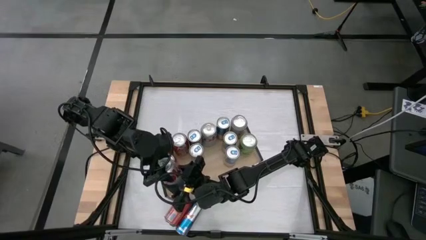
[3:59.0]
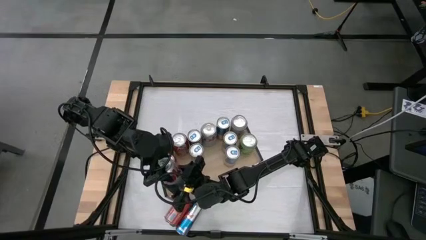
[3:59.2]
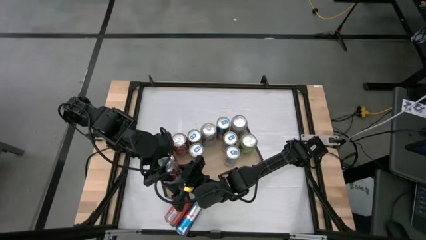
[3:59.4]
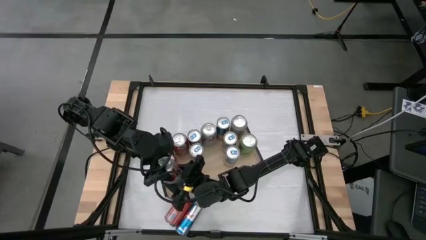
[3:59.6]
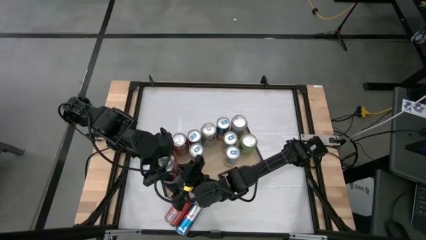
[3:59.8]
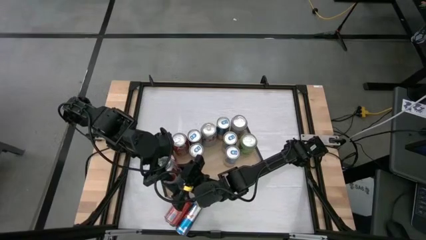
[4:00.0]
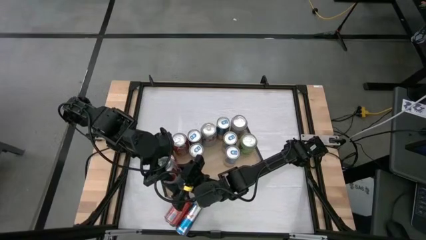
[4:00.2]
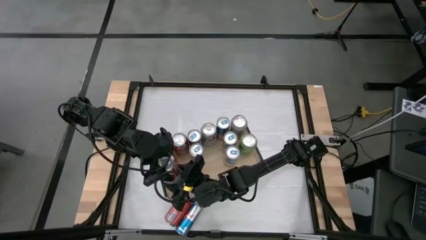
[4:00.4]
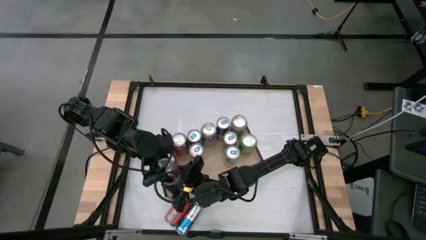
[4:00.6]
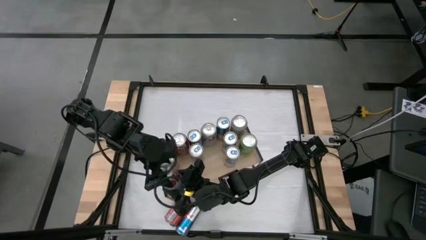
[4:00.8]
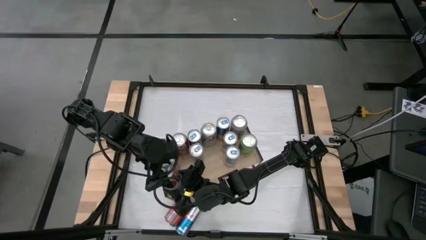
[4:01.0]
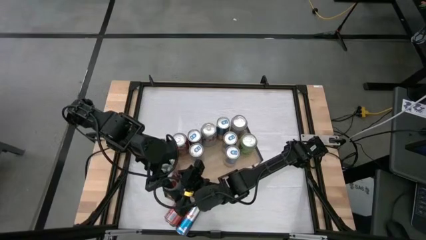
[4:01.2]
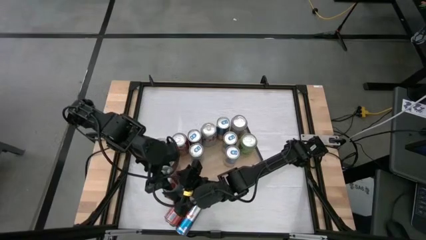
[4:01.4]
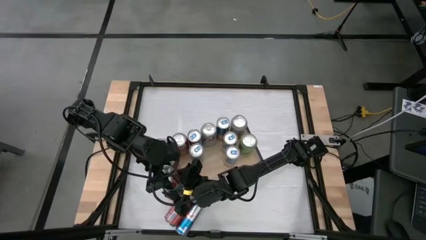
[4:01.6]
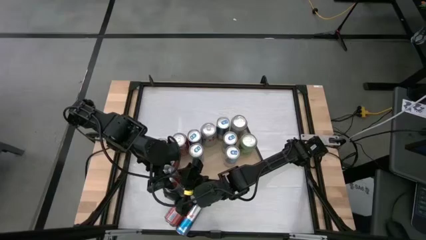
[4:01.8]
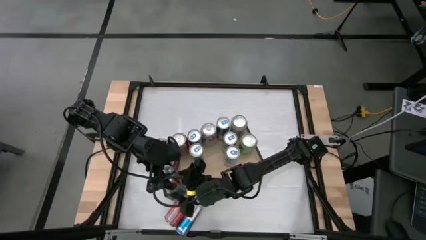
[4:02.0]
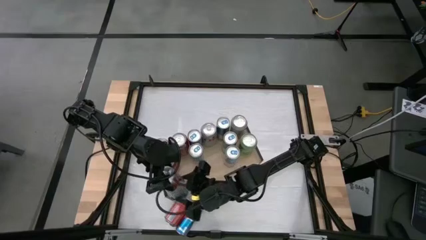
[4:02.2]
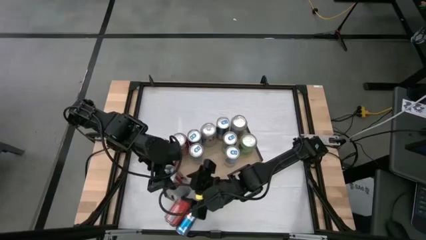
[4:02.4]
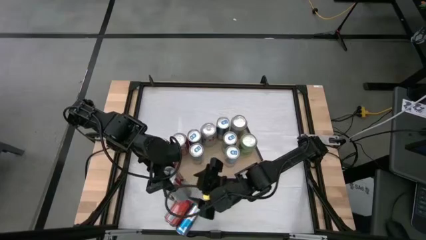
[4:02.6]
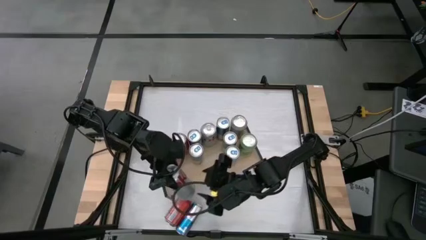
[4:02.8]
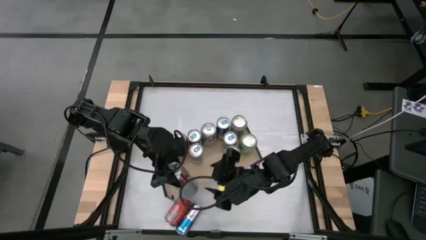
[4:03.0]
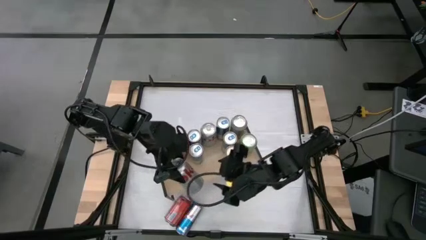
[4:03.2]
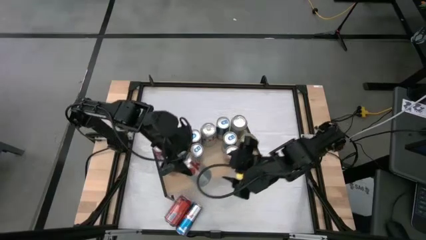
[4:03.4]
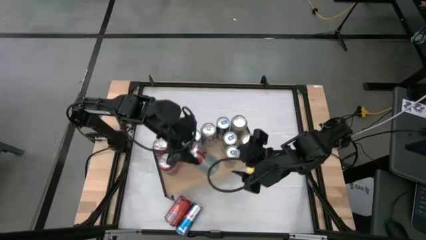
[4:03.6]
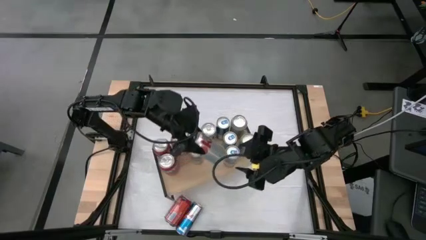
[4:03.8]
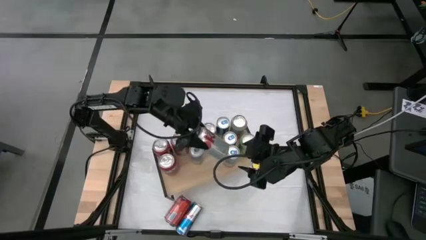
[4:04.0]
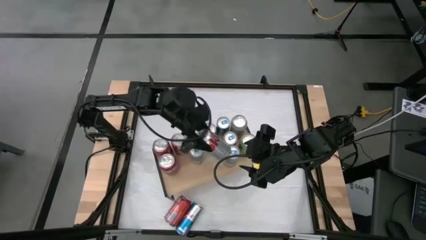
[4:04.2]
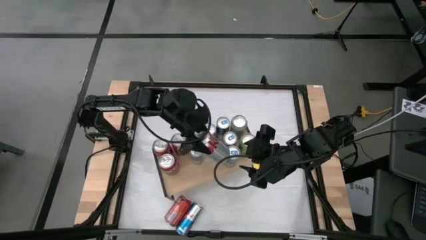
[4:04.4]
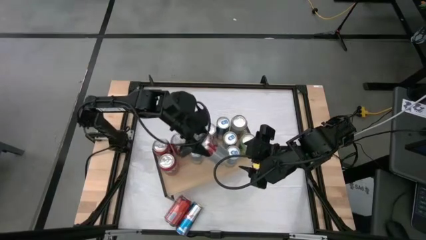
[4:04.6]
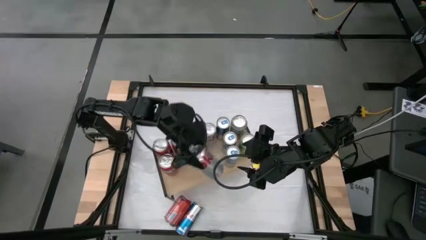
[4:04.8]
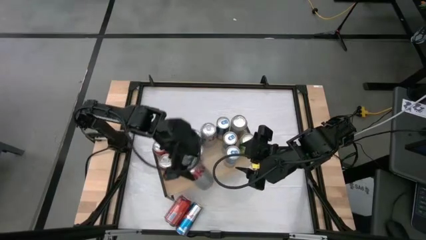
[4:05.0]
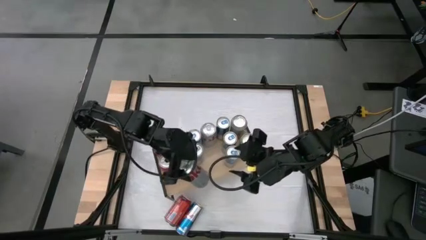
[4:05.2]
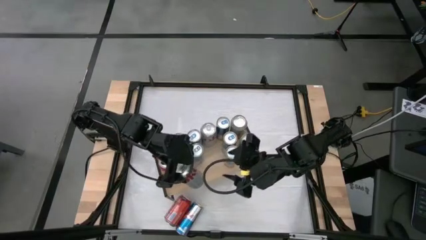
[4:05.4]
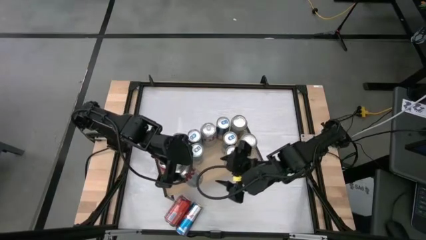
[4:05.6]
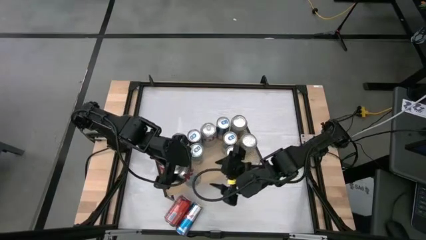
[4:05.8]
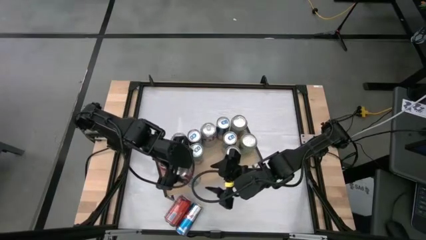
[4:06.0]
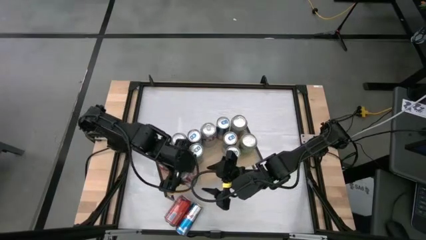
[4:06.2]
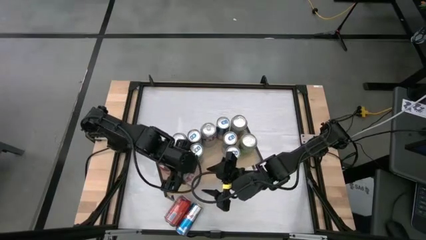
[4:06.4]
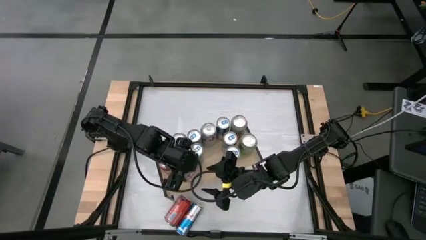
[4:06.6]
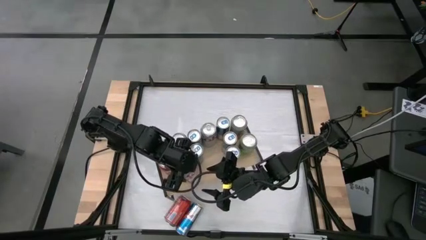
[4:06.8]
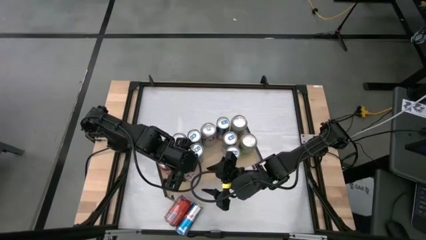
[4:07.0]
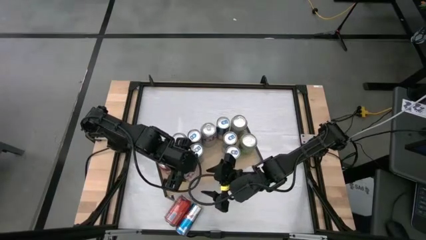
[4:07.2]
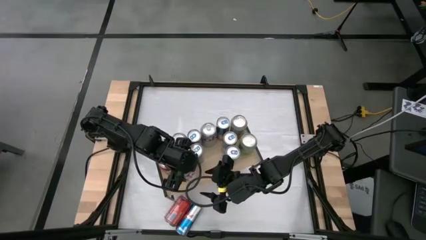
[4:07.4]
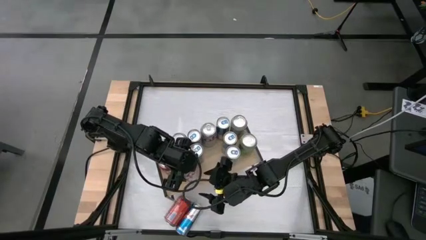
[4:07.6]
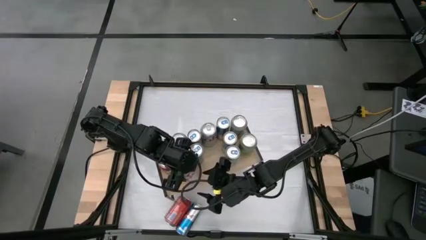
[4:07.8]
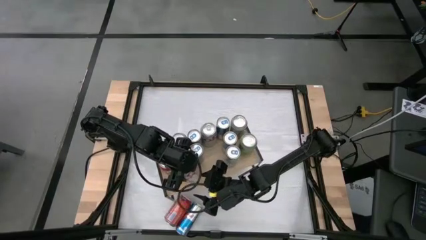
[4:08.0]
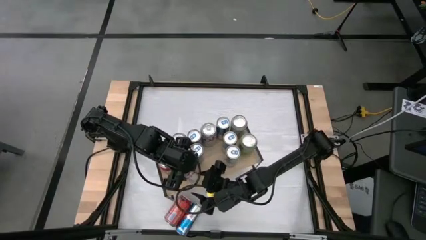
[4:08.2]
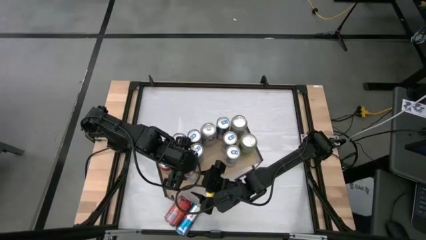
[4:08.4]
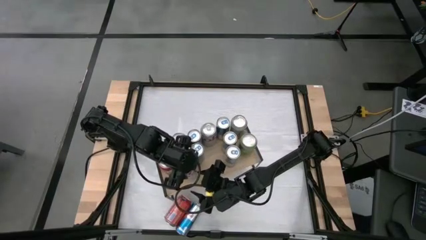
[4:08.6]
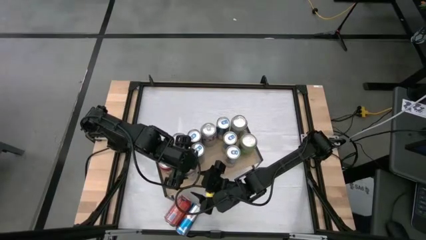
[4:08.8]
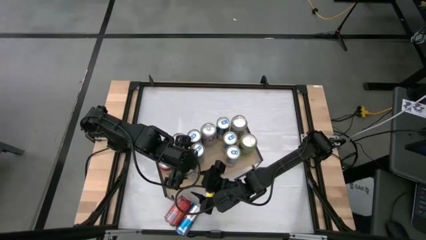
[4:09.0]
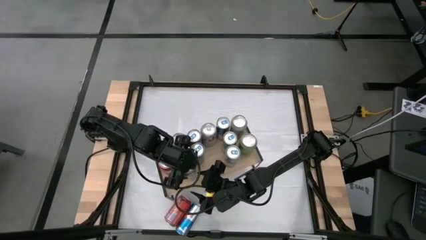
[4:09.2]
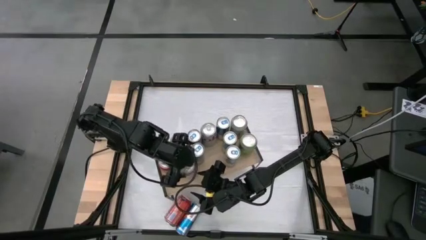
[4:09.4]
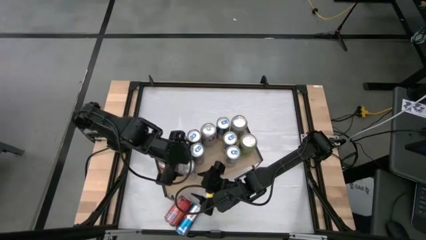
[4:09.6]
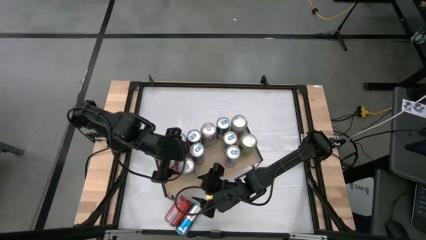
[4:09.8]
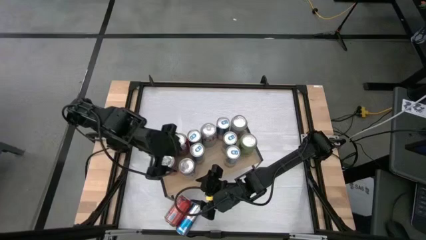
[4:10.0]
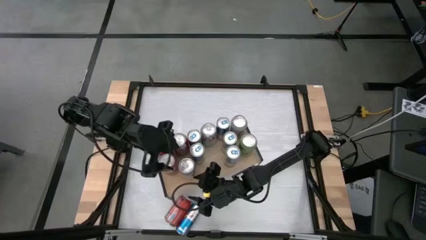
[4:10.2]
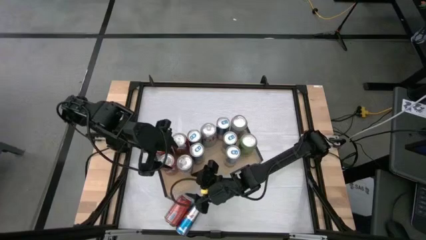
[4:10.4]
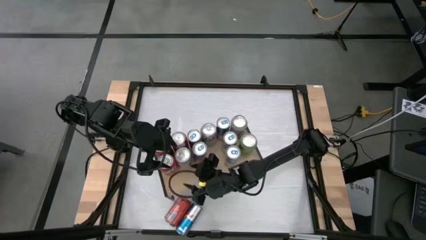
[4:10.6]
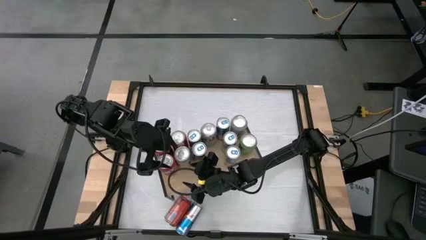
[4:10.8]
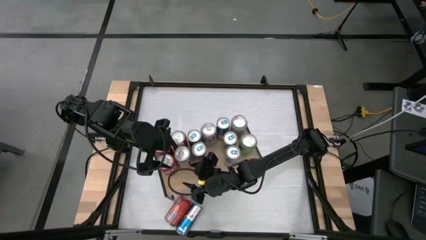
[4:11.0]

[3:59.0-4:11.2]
Task: Place canned beverage on shelf
Put the red silver soda can on the shelf

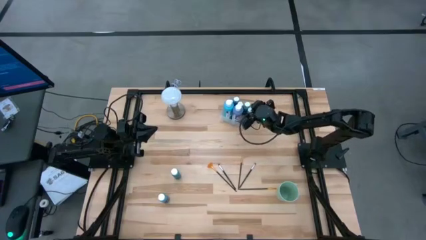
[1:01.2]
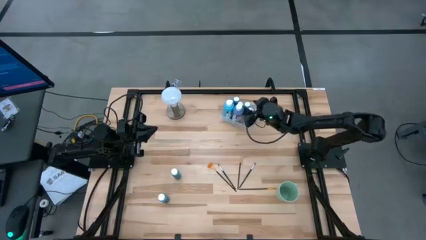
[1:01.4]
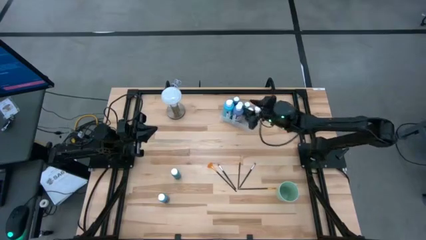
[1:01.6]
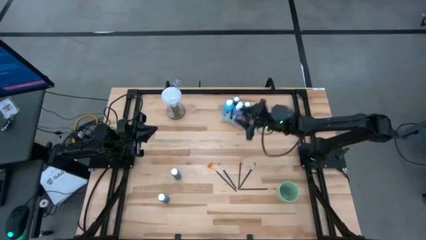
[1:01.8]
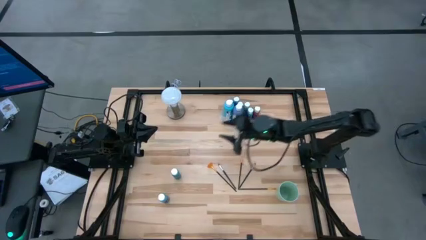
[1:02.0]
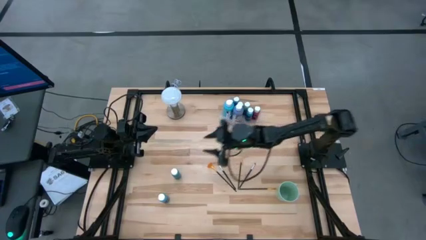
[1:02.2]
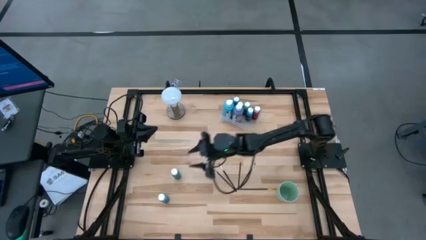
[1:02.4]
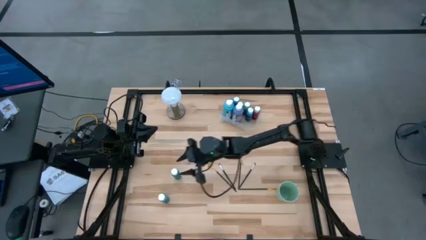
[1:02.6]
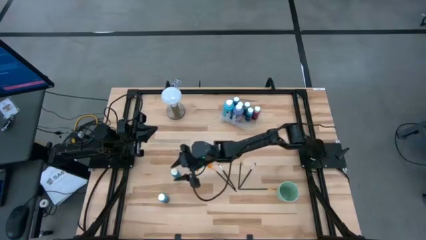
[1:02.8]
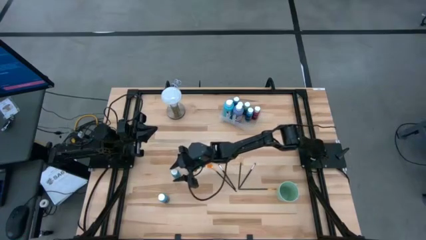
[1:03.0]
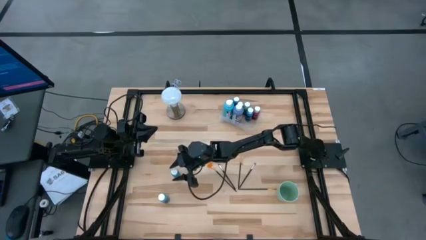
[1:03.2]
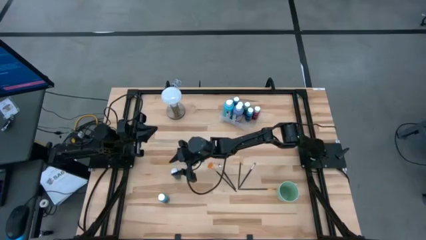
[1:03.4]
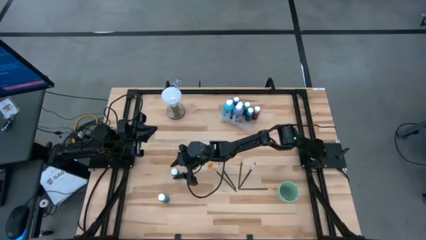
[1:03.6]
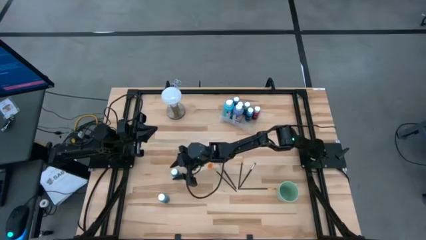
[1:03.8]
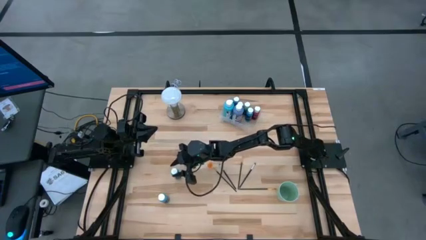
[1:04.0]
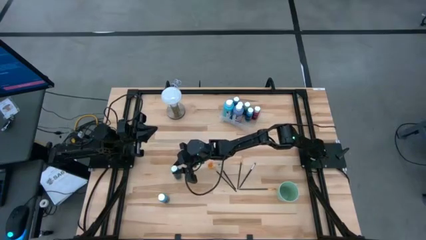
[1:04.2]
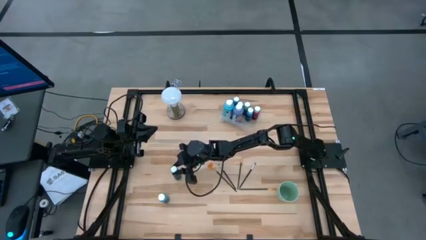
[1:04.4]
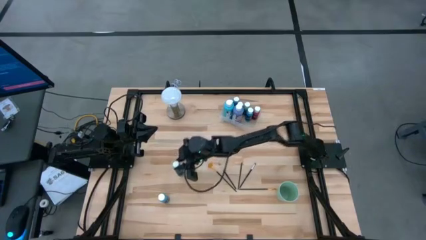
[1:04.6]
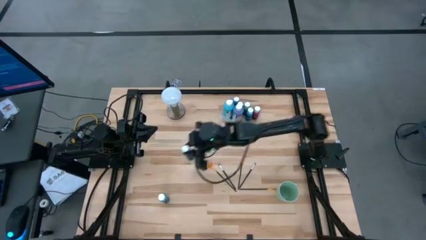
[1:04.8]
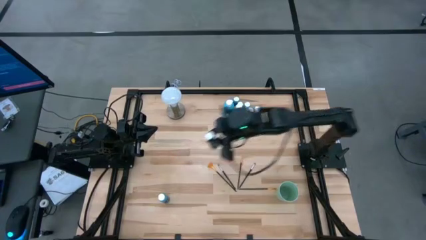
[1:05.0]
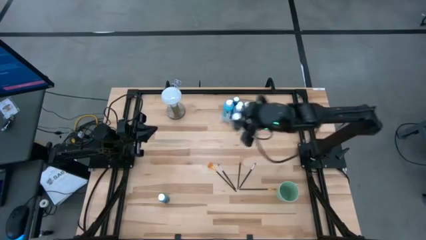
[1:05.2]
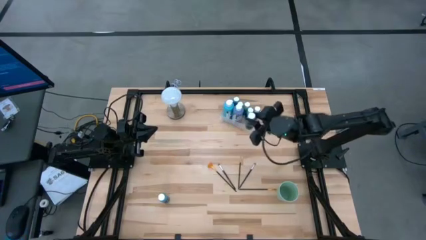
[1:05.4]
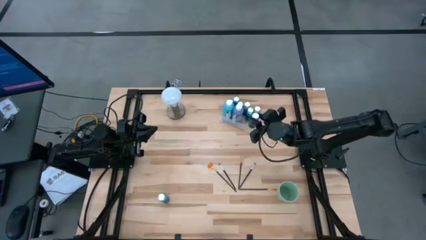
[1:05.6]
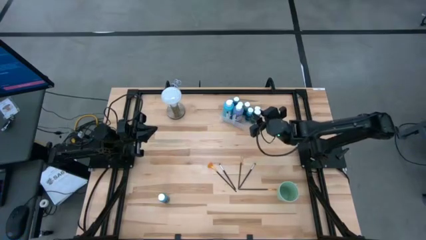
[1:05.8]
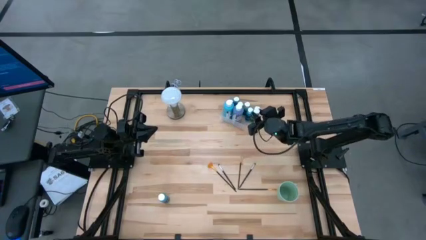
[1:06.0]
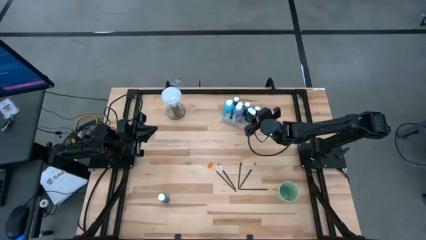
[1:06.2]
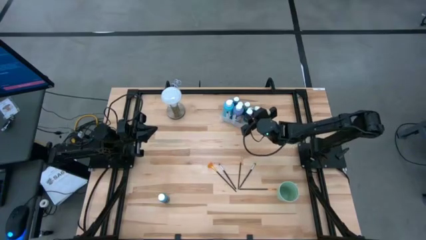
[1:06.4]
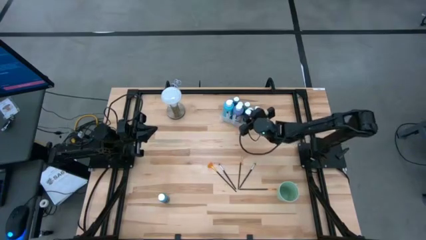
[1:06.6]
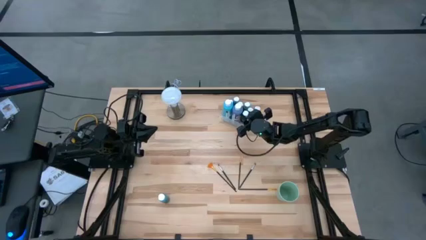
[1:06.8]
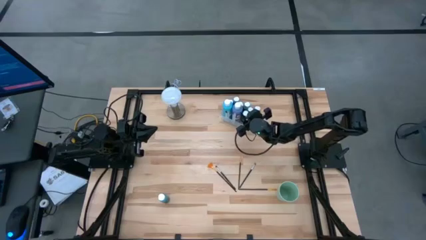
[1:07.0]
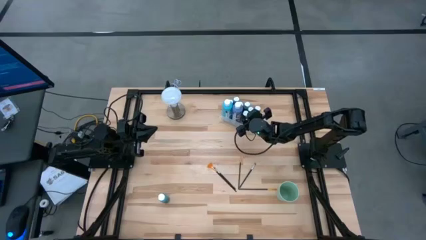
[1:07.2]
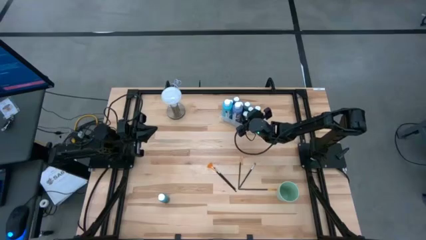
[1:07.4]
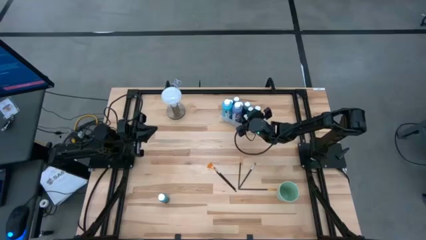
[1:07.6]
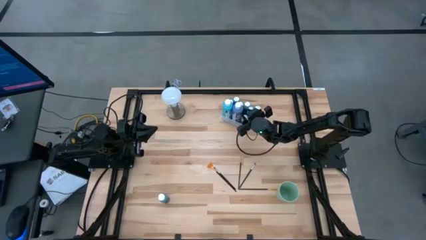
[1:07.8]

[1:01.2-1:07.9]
Task: Pick & Place Paint Supplies
Put the top small light blue paint bottle into the transparent bin
